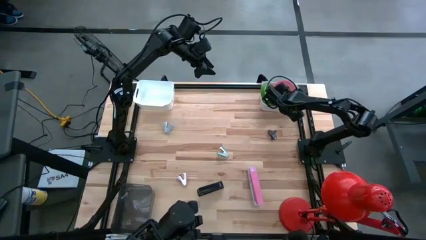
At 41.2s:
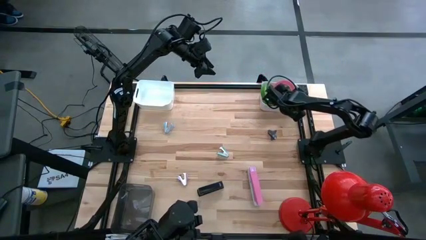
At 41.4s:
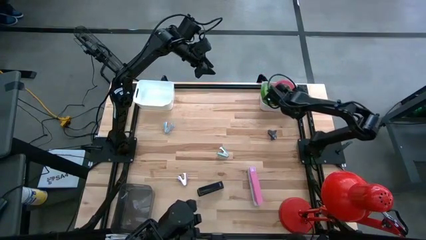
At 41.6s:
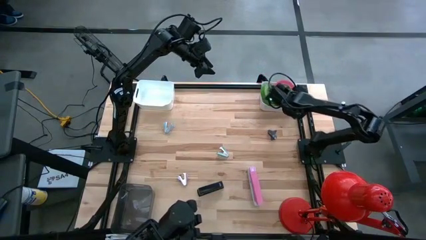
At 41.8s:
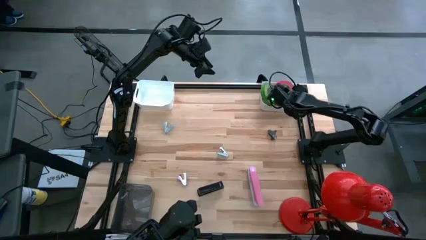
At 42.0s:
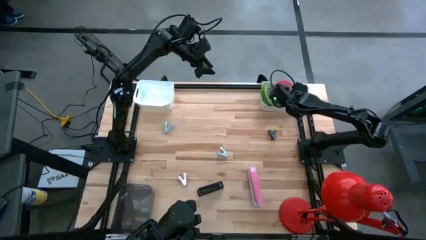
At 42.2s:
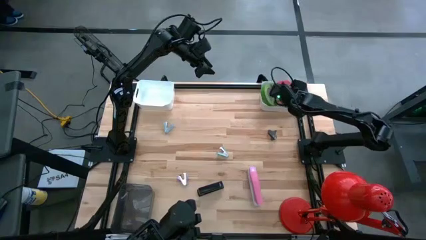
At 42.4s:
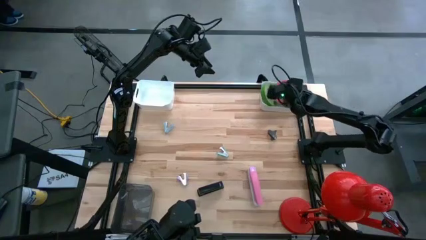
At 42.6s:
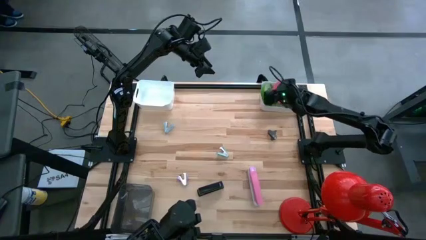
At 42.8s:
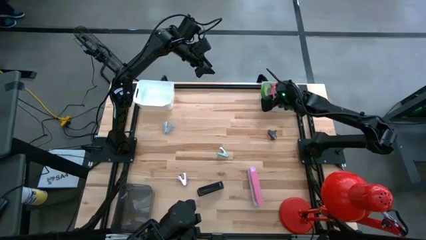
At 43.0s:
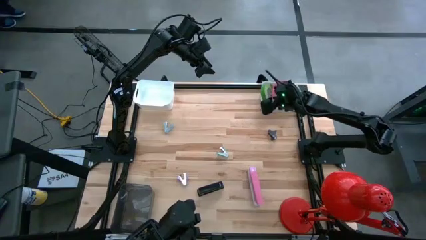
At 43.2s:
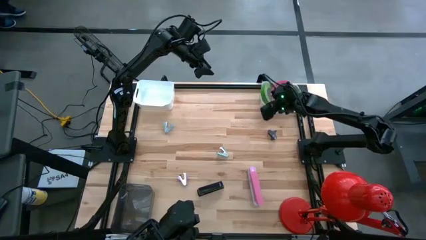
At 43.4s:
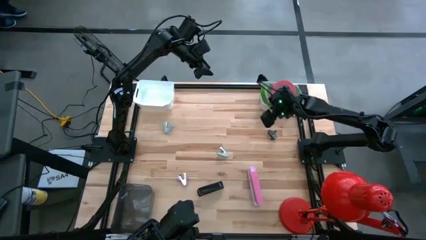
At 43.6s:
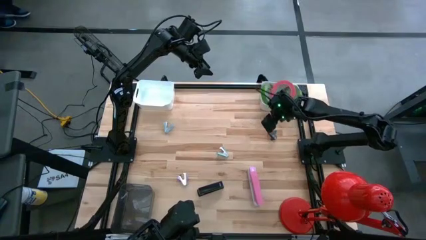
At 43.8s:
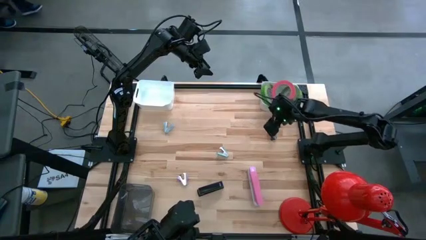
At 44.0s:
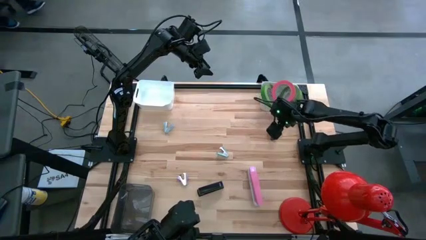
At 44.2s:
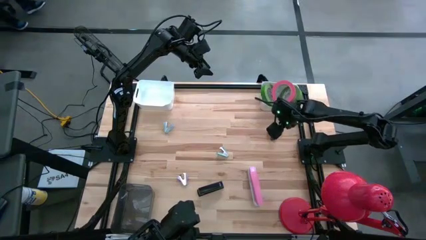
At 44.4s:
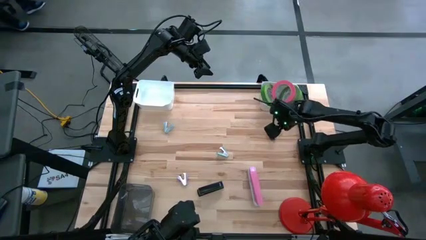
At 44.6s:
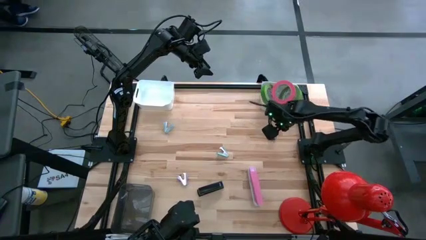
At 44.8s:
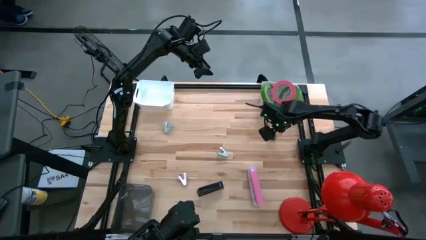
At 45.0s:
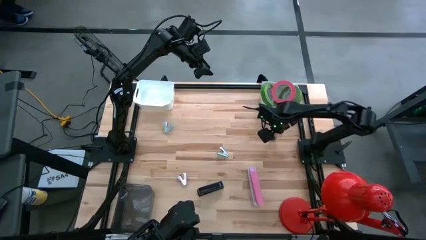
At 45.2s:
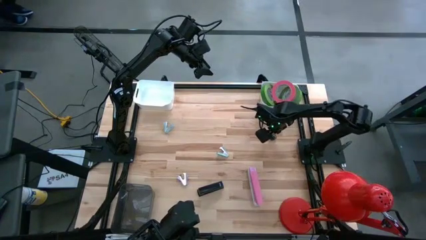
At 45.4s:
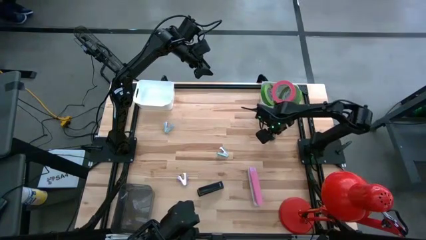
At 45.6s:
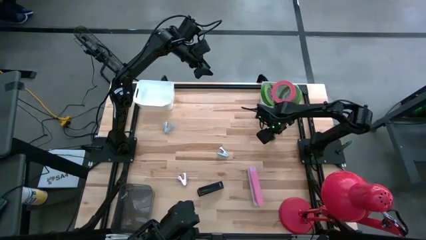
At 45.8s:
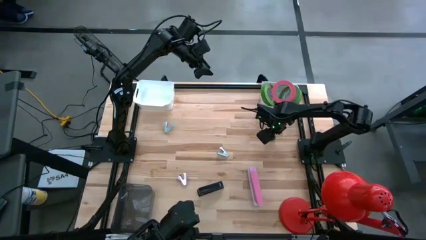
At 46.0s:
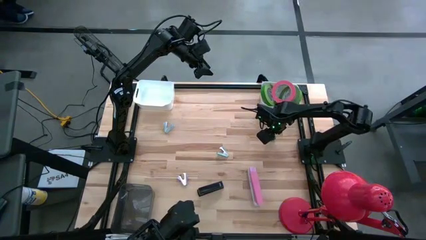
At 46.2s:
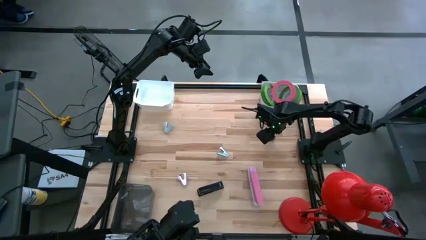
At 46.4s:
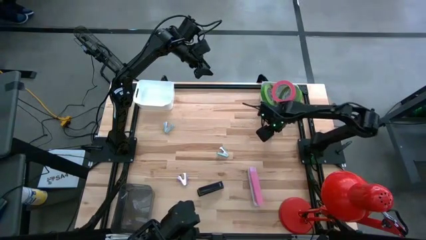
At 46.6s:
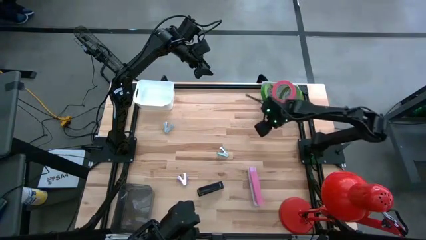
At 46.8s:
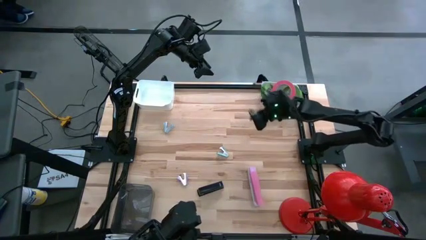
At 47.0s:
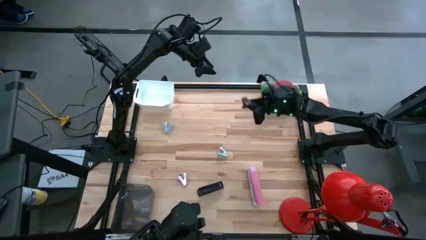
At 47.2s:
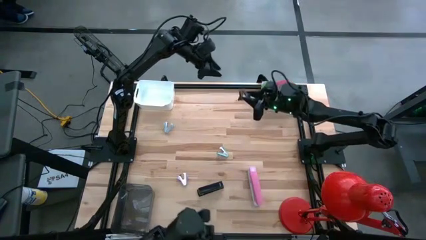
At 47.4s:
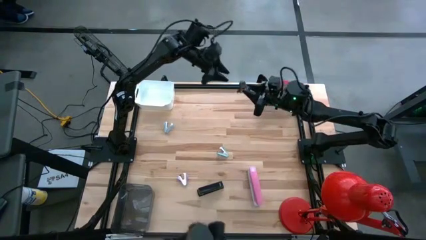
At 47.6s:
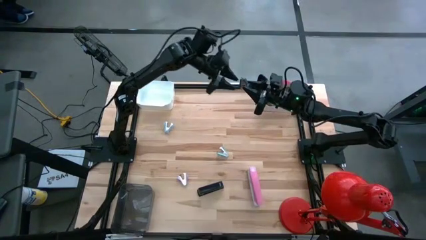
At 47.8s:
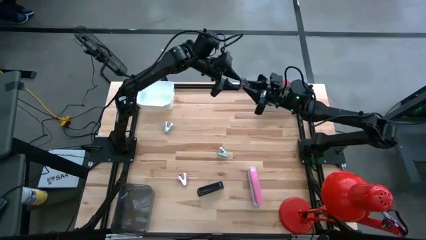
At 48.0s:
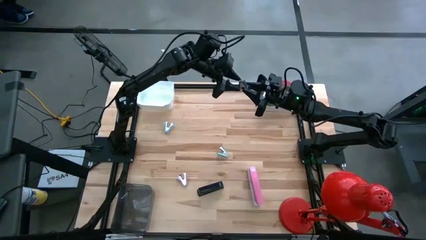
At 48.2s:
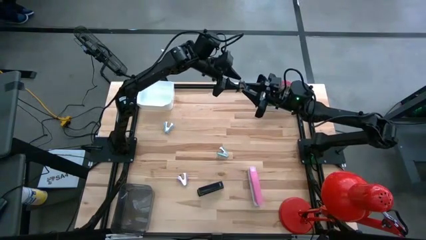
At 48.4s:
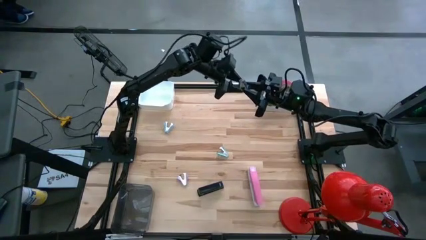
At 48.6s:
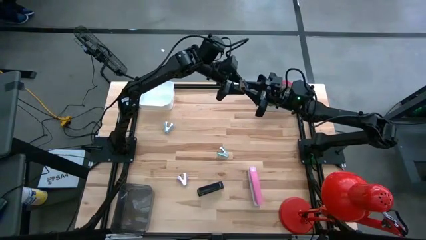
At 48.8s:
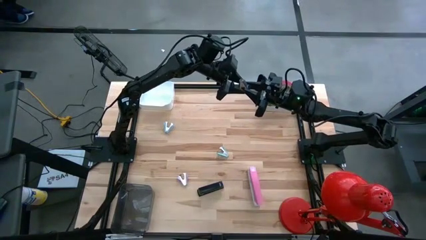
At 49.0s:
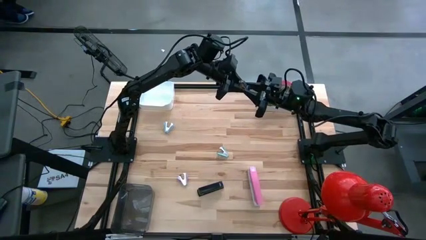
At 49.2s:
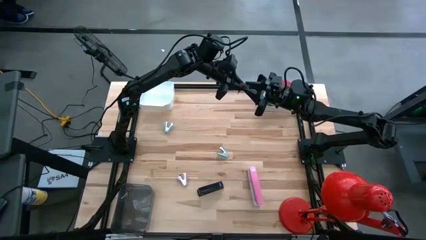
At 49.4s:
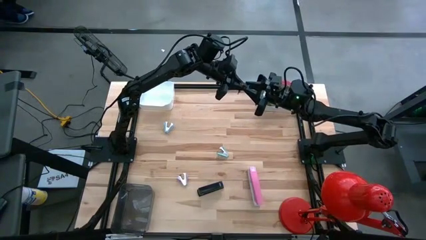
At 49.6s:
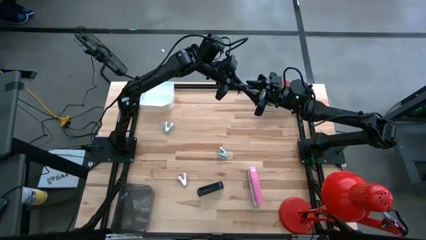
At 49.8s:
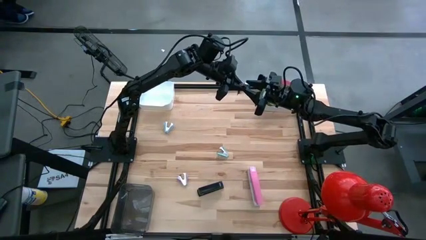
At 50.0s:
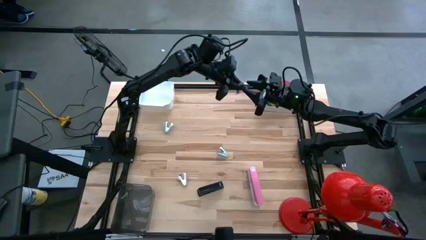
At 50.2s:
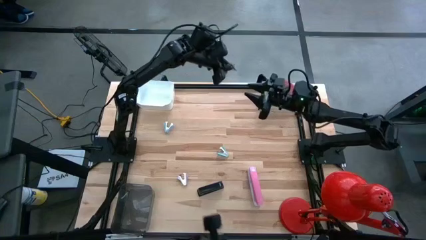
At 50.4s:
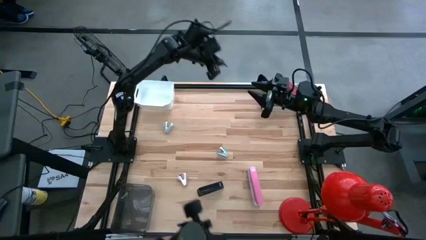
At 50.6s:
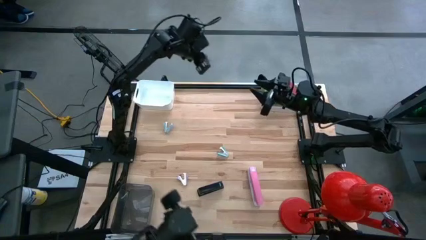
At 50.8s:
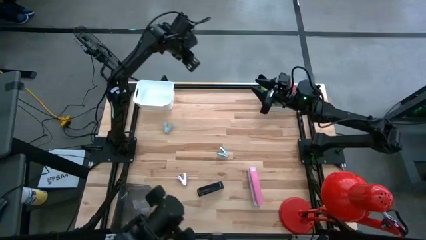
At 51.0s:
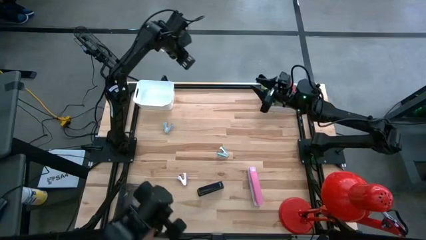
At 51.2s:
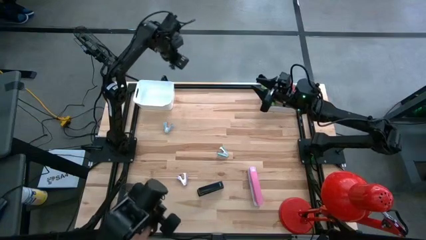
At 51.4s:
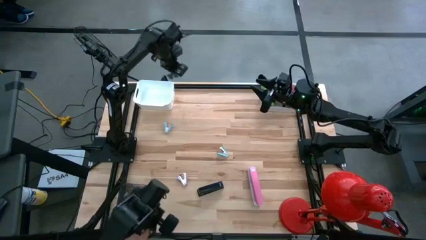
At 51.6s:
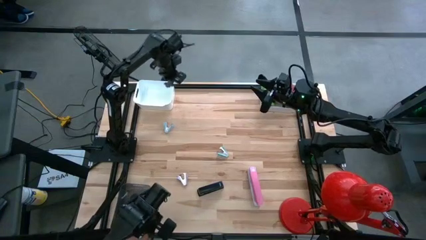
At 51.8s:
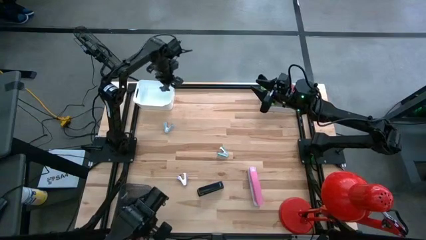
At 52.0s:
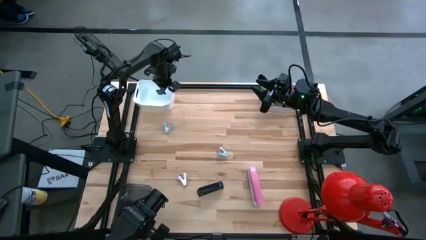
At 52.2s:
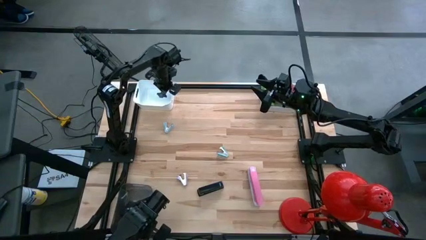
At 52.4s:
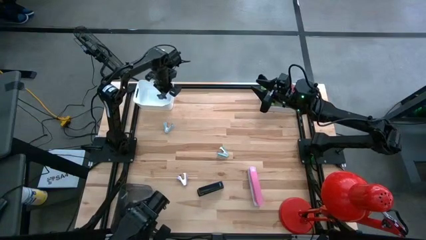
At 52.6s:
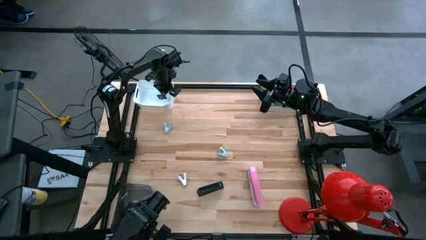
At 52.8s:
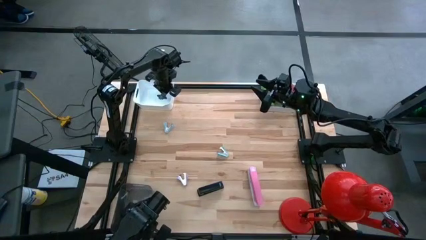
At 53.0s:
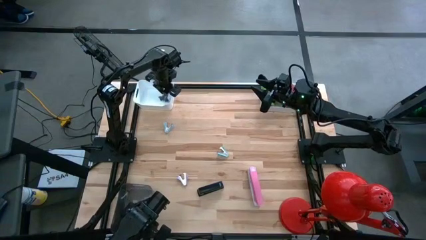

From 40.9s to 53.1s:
Task: Pick and place Stapler, Stapler remover, tape
Put the black staple remover into the left white bin
